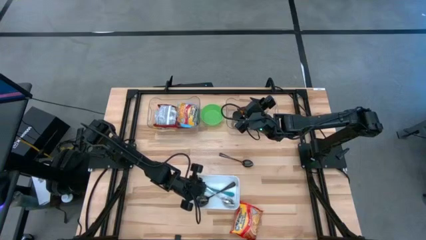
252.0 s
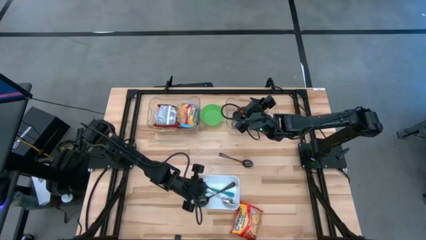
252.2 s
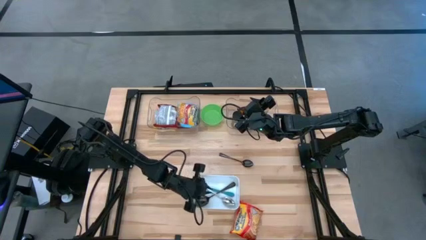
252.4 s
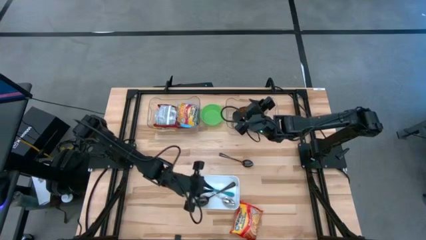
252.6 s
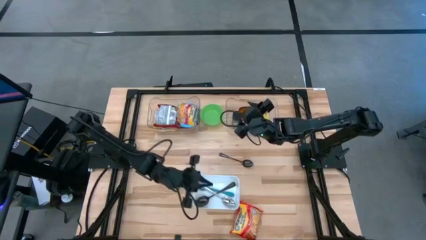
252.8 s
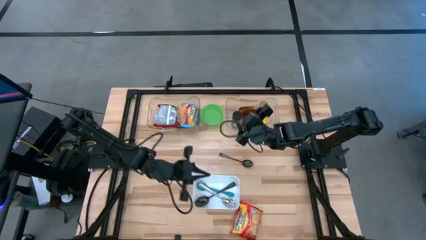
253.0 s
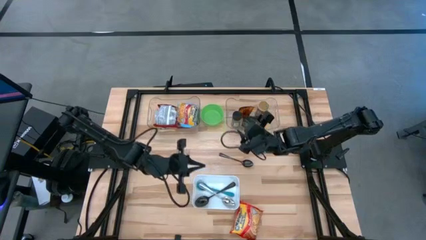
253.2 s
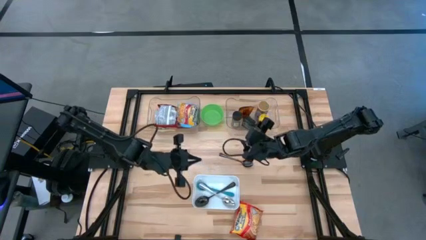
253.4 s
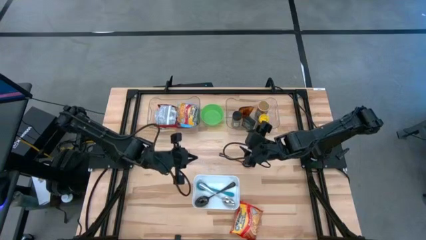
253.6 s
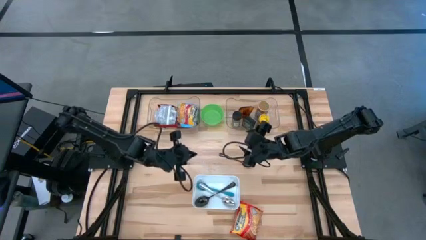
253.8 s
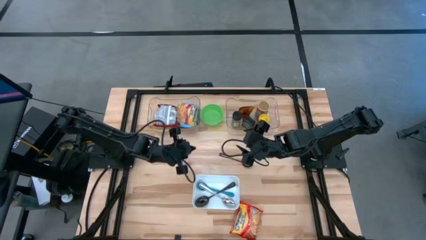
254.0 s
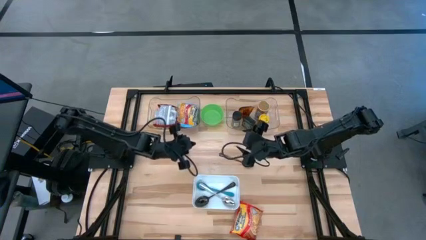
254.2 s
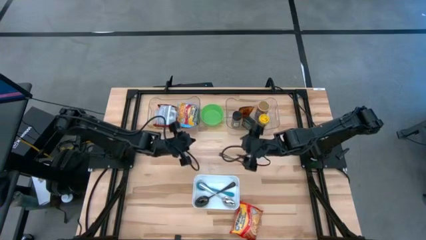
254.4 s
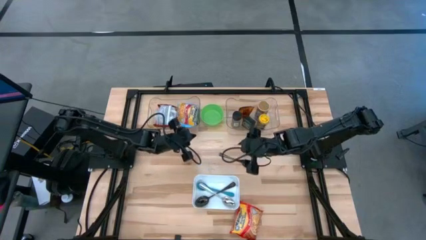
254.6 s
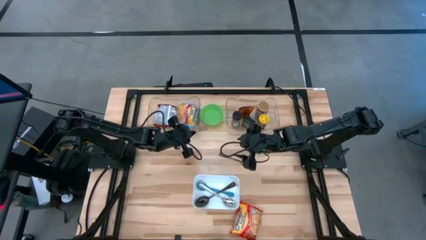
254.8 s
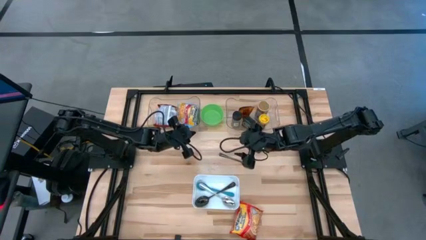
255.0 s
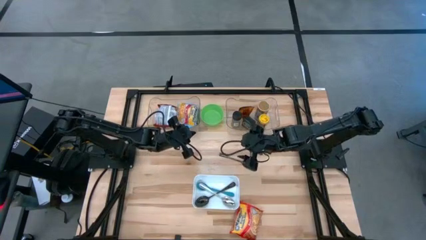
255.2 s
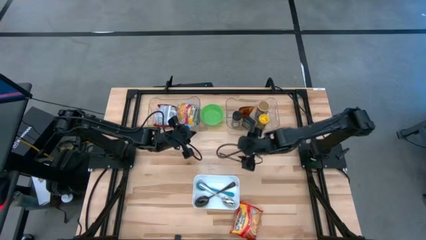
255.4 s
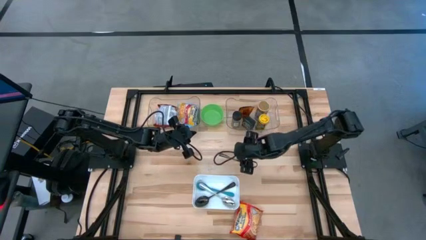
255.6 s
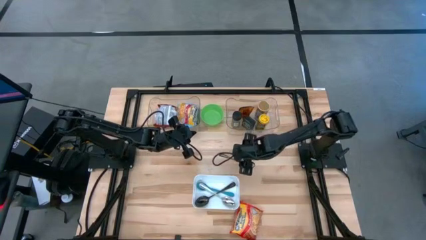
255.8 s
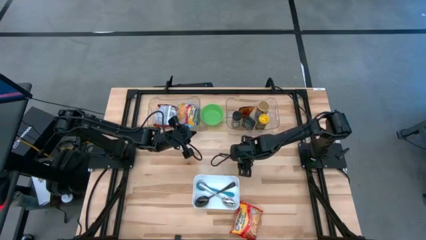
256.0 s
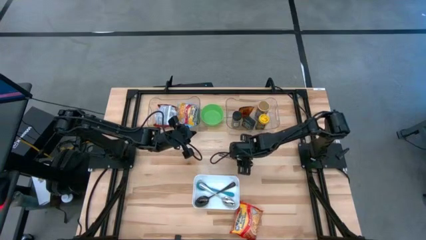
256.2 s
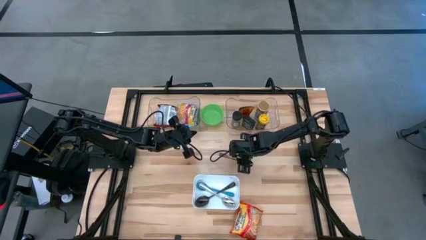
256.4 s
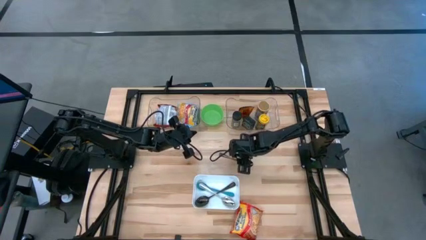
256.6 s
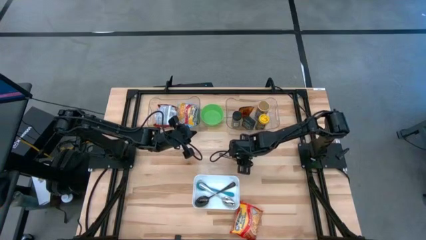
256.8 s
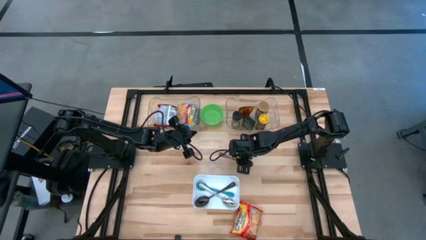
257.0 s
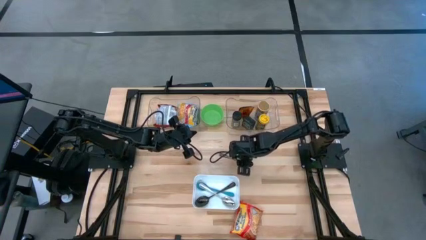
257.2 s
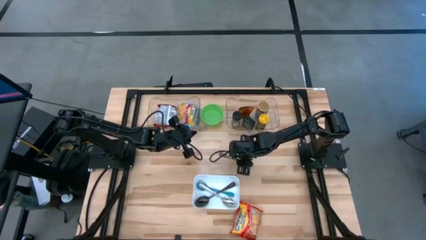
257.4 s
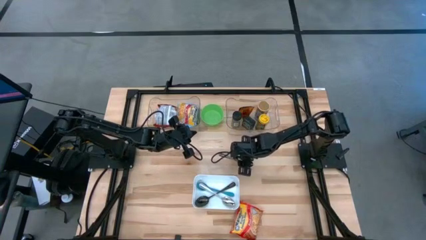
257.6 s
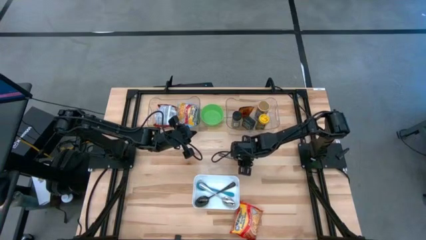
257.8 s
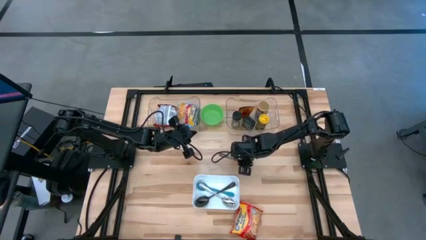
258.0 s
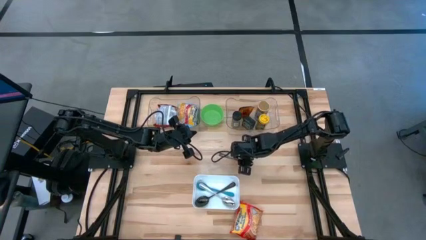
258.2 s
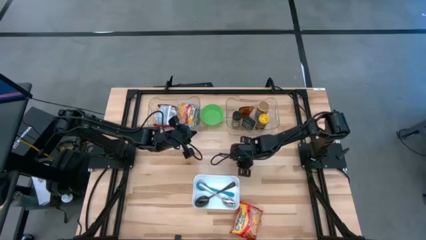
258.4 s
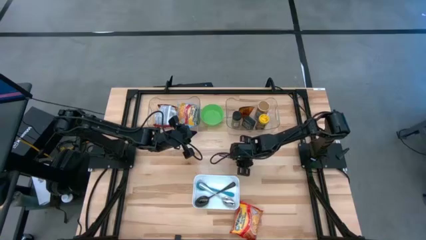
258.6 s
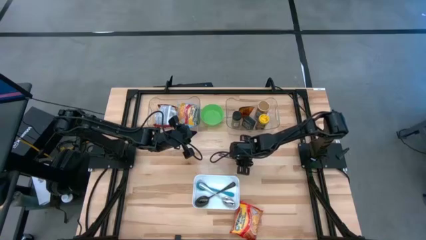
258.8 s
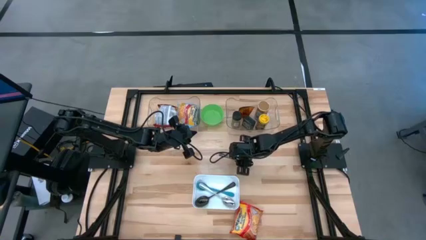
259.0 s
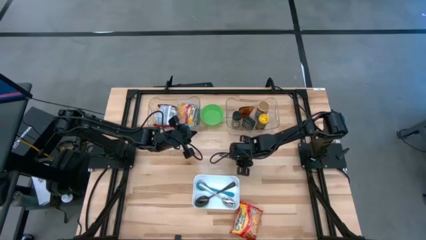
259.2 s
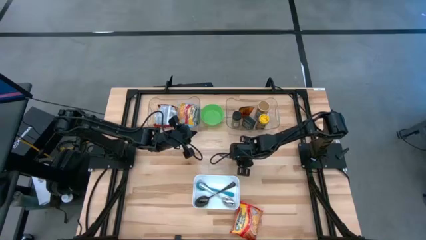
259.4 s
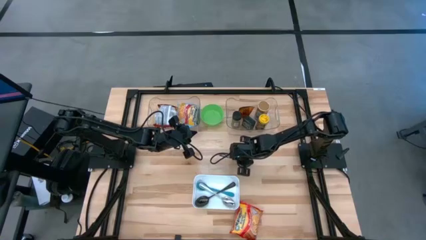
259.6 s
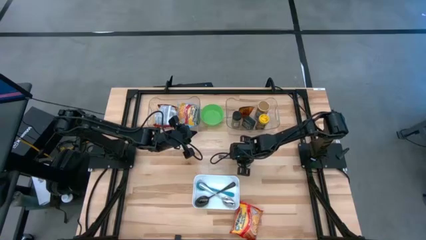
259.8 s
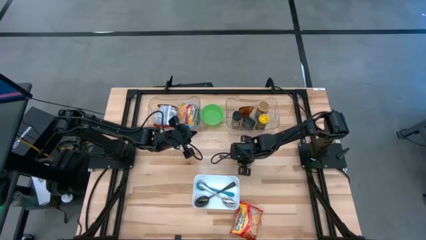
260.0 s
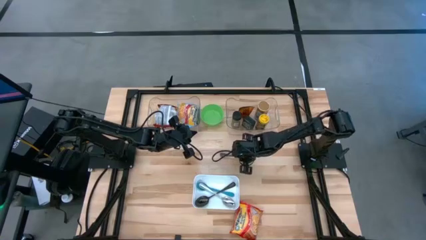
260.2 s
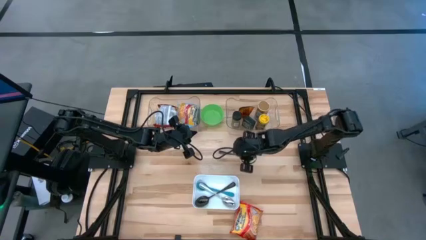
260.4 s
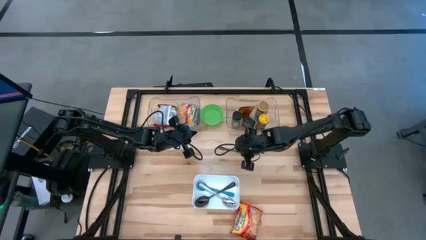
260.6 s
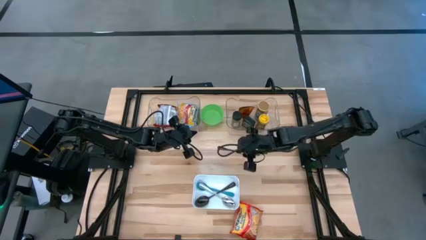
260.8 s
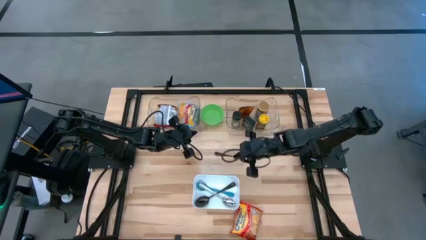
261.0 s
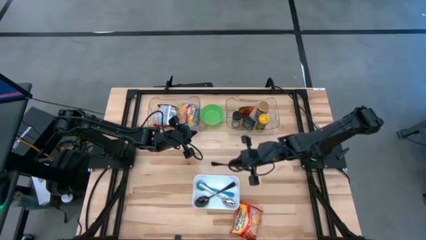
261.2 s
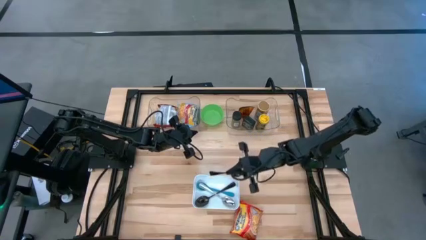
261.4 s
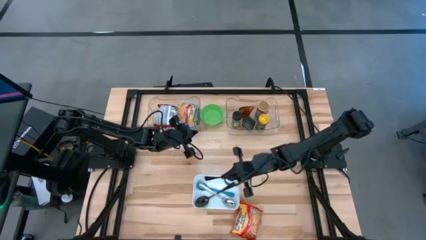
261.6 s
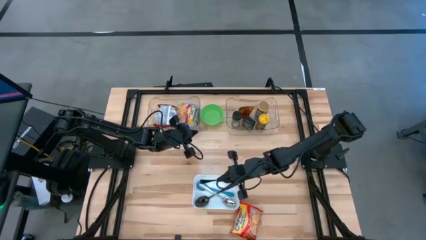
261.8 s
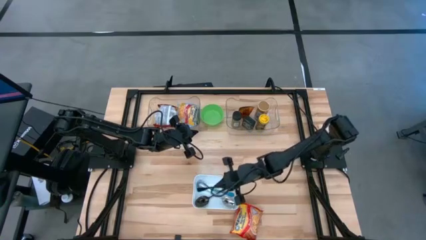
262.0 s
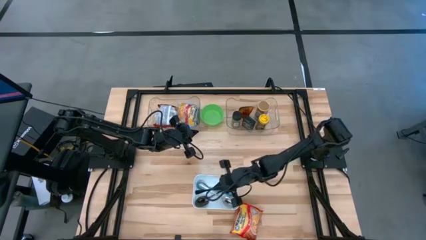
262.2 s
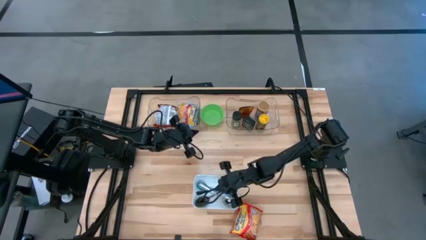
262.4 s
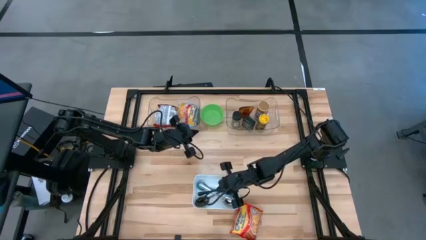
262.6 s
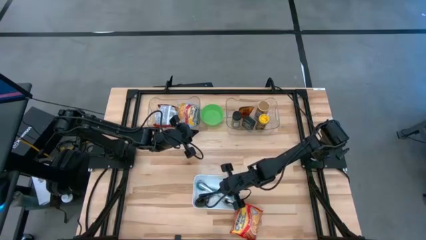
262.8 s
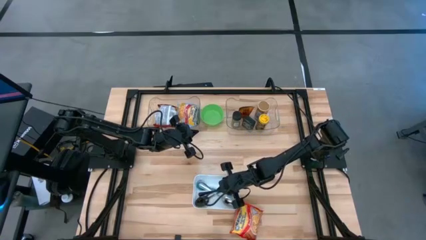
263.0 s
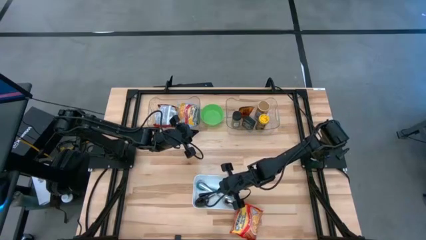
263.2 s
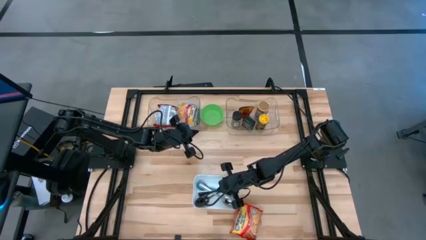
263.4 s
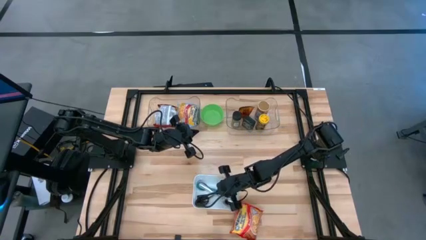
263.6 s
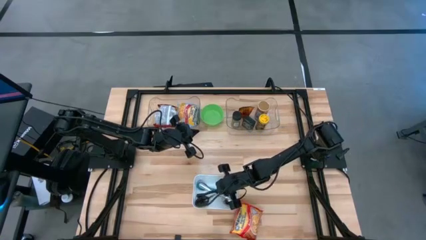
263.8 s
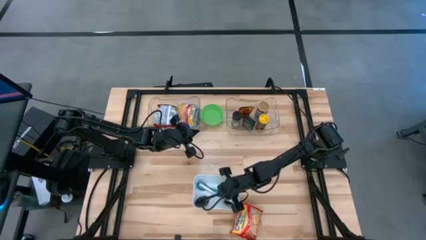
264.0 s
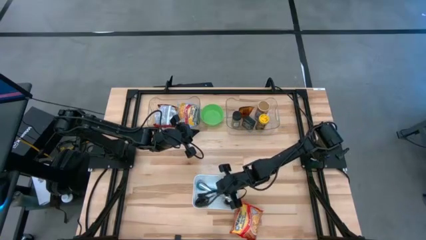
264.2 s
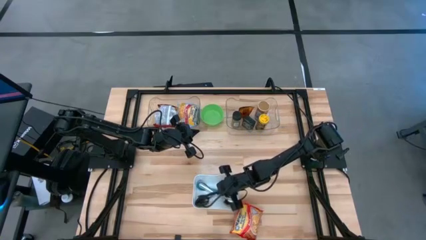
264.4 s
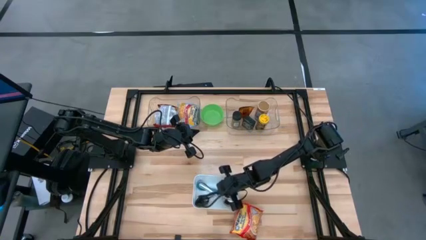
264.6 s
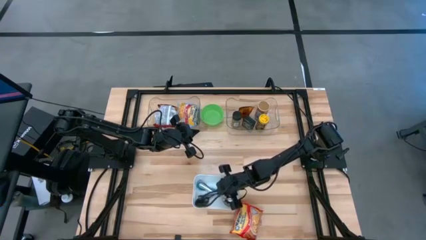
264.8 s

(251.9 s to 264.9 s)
Task: Pick & Place Food Item
Put the black spoon into the white bin
